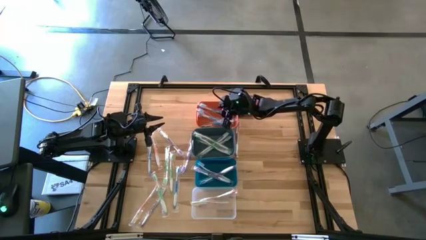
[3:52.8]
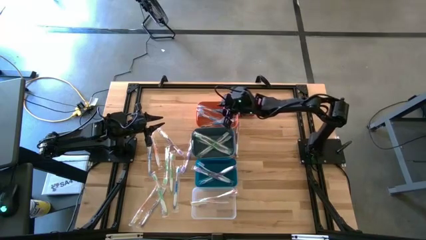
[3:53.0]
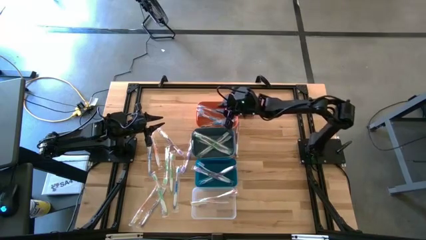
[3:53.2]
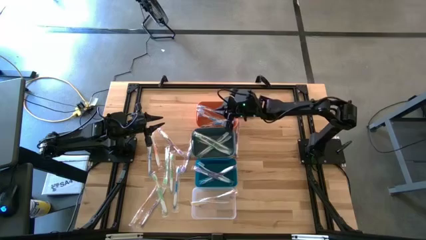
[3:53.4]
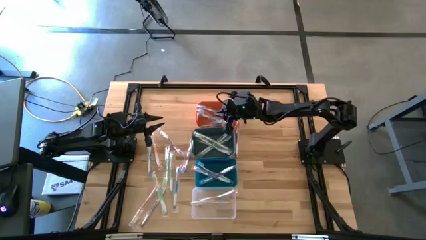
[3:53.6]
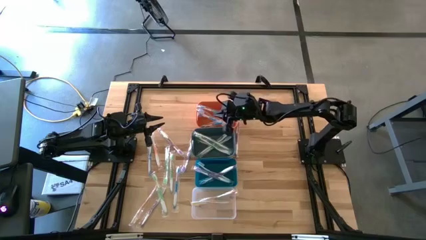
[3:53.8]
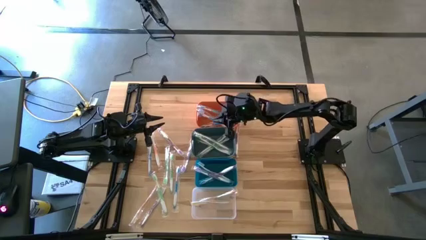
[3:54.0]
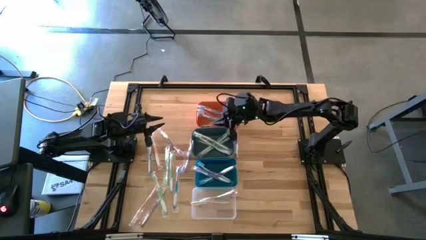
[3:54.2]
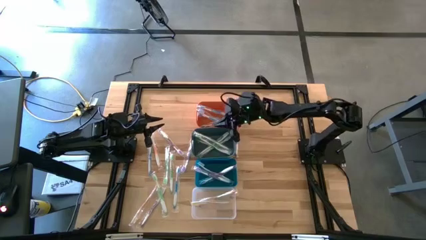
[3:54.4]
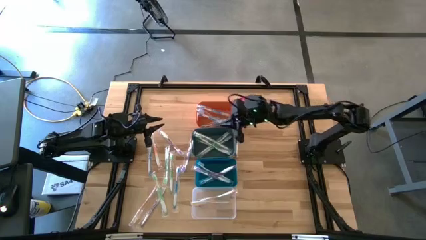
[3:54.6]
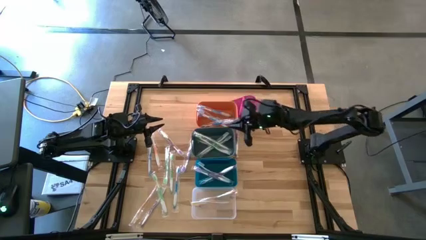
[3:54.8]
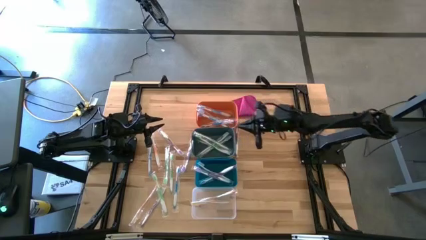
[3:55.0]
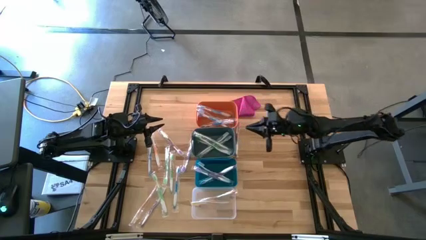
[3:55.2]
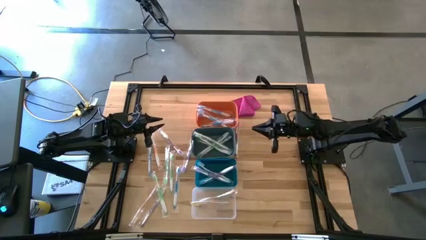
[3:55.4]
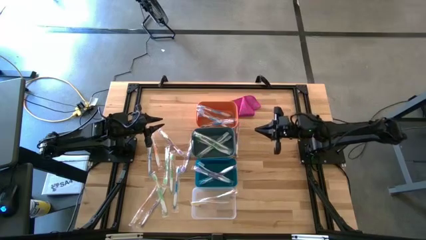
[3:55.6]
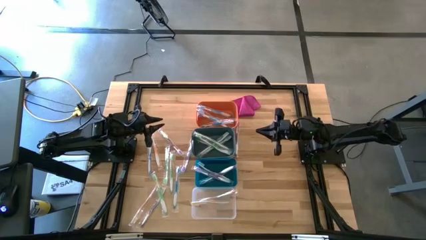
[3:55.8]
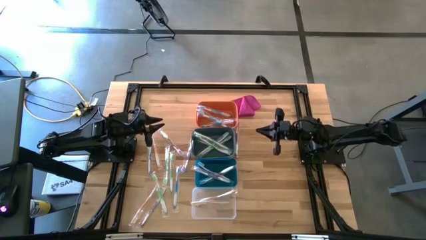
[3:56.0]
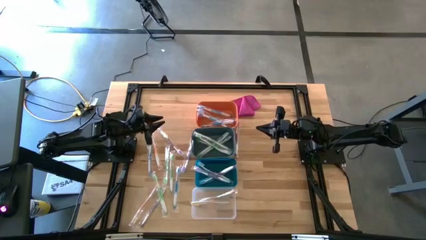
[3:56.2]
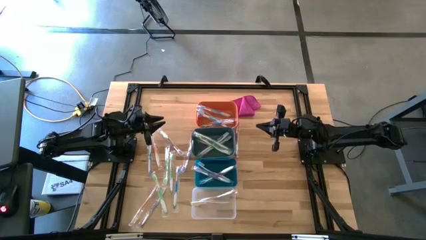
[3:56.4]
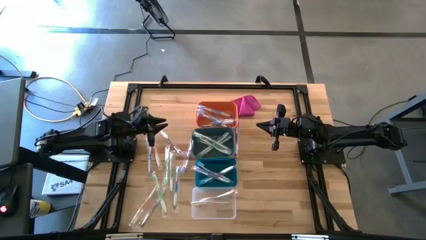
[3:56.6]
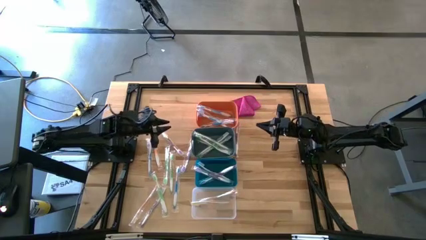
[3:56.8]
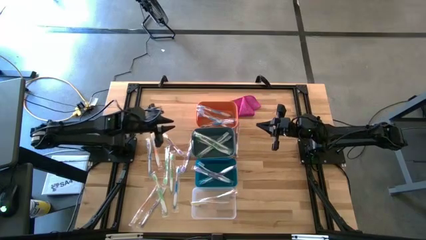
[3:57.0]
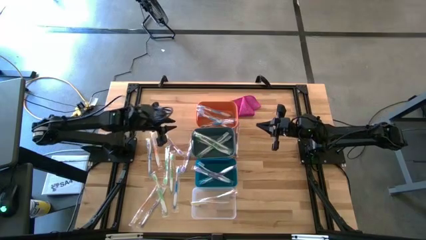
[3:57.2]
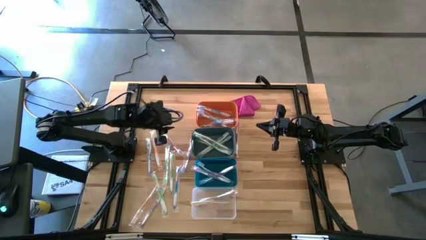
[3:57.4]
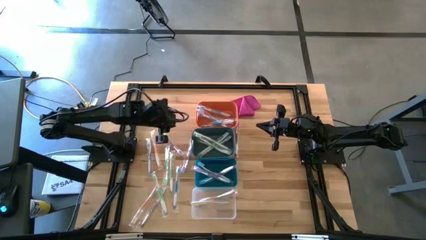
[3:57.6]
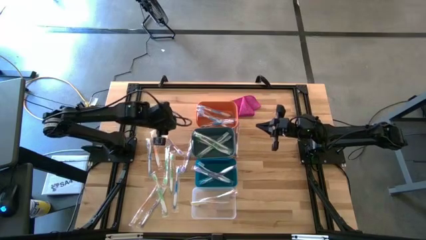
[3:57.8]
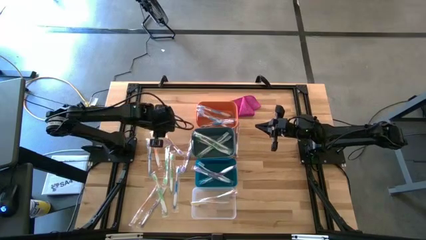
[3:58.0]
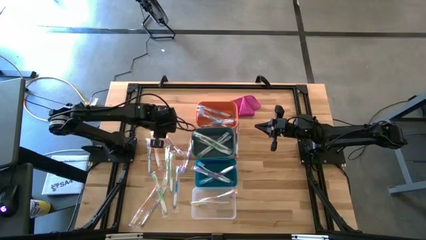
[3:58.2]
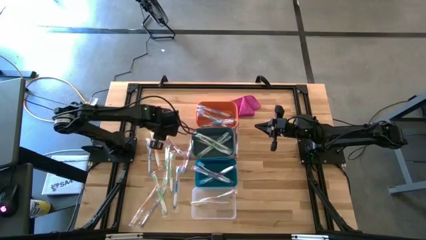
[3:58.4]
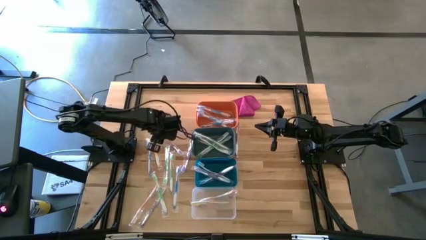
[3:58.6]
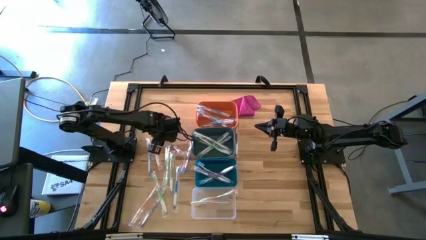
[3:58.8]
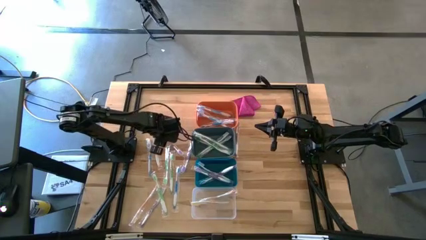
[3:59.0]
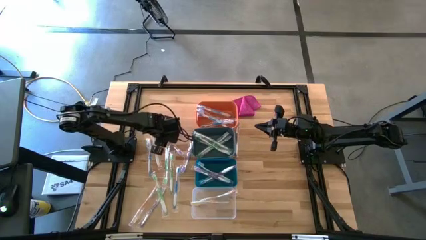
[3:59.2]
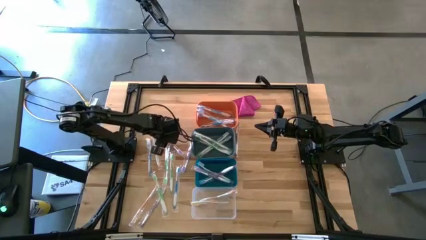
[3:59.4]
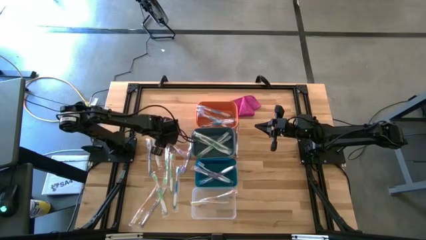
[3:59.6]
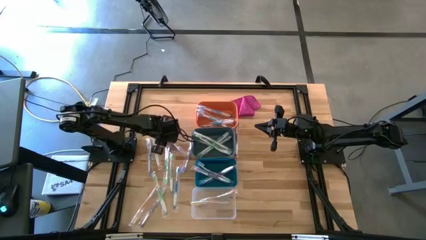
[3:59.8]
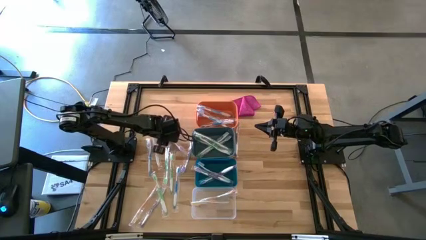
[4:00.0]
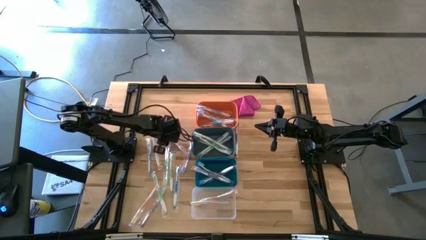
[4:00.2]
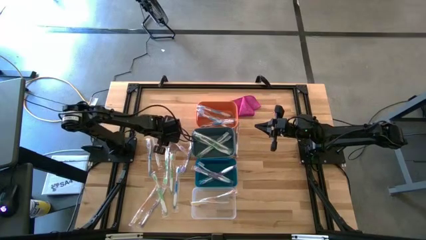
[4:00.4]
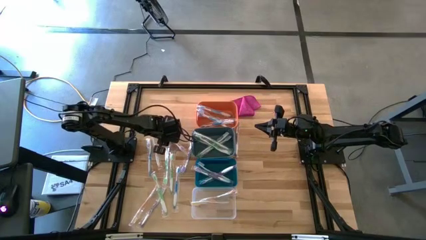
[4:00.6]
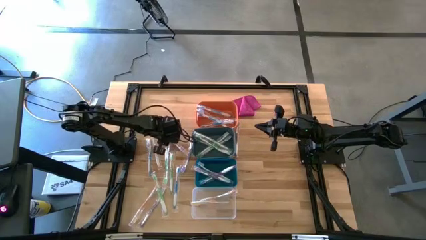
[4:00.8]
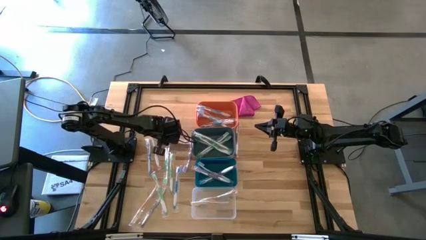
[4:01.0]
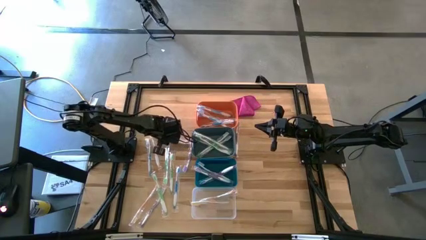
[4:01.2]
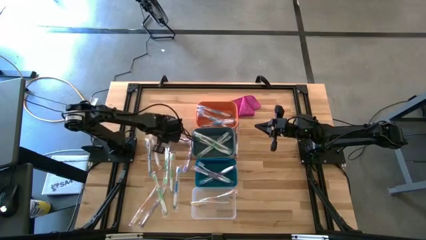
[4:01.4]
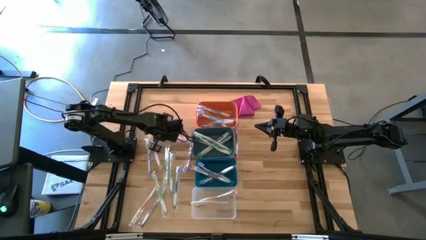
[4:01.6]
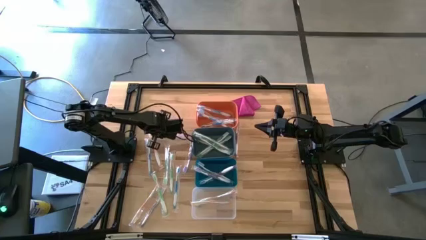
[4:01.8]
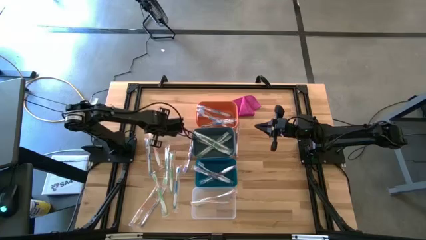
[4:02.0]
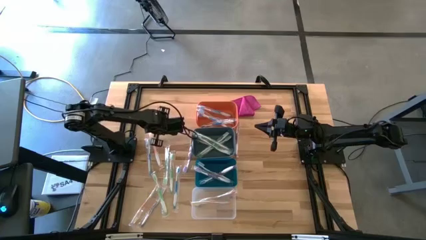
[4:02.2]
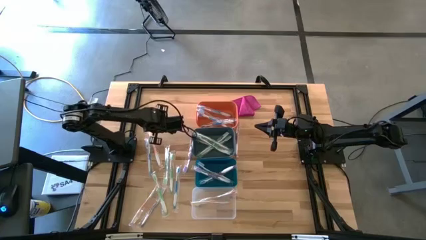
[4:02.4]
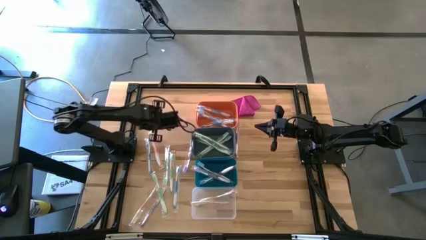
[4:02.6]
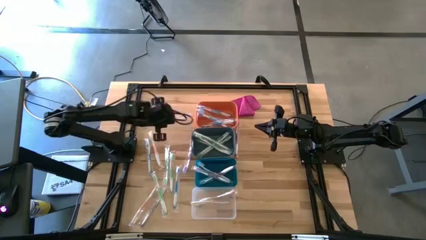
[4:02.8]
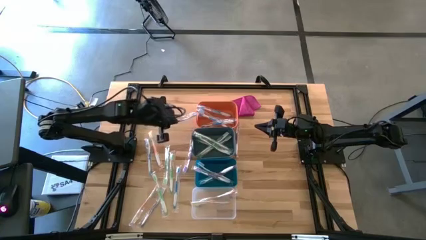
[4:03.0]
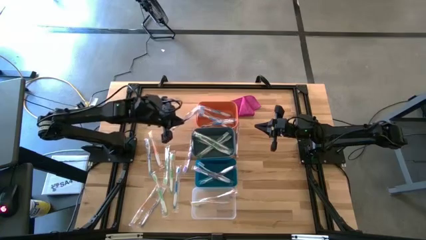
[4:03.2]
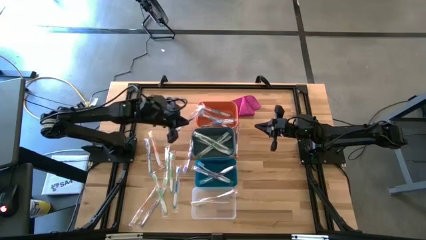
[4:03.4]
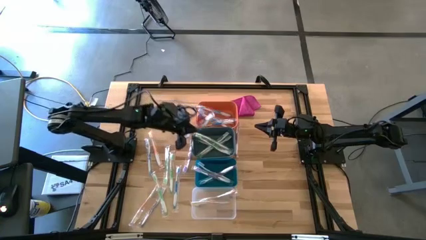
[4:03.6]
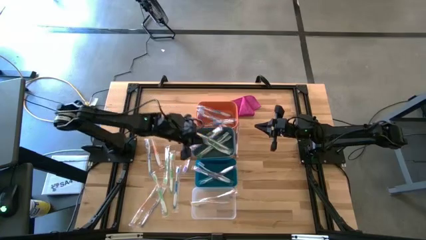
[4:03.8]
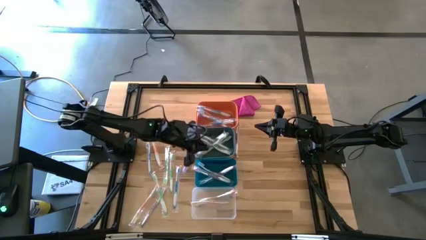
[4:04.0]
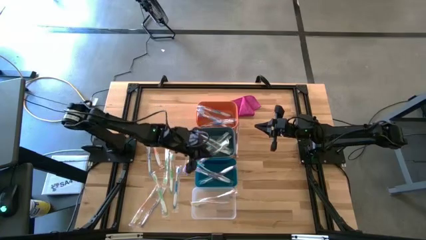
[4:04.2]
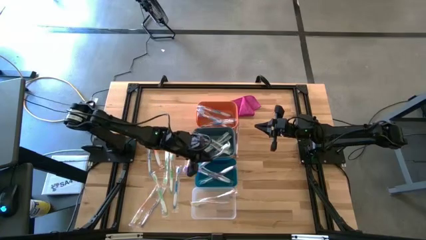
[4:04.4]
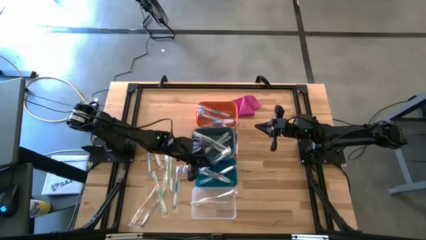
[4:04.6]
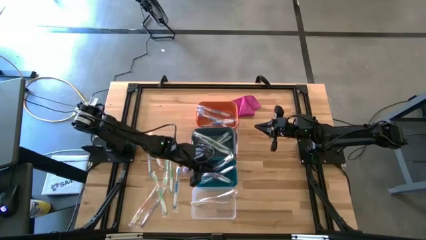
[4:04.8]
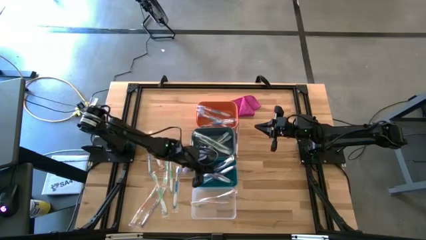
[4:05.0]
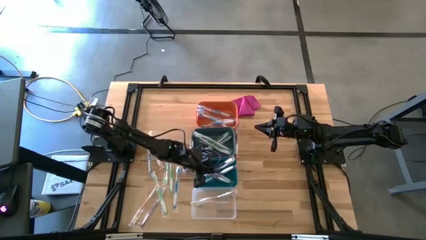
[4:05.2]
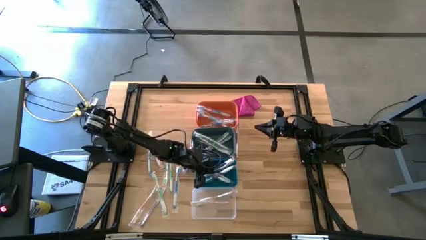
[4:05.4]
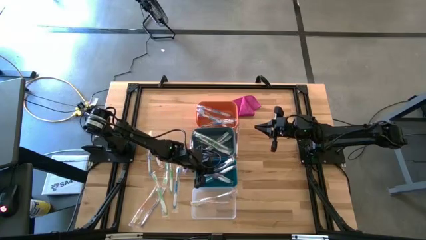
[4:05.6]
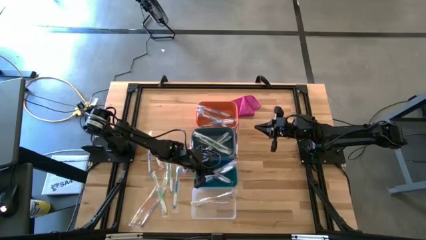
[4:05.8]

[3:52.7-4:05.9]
Task: Pick & Place Toothbrushes
Put the purple toothbrush into the blue bin

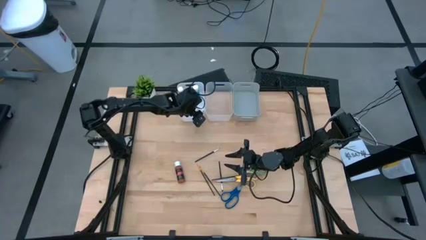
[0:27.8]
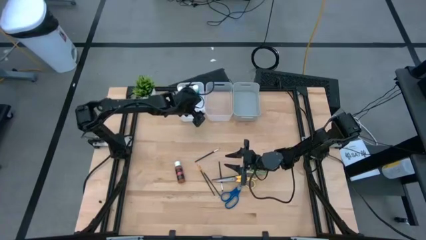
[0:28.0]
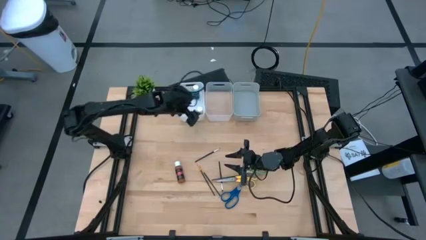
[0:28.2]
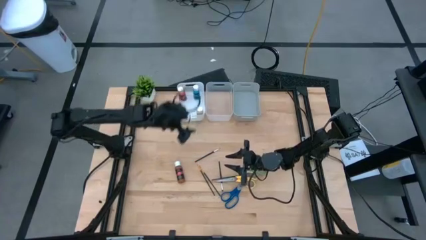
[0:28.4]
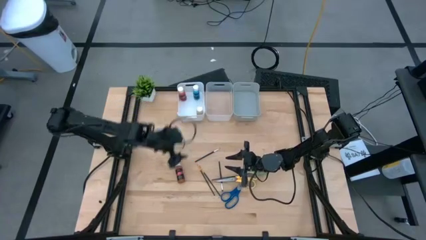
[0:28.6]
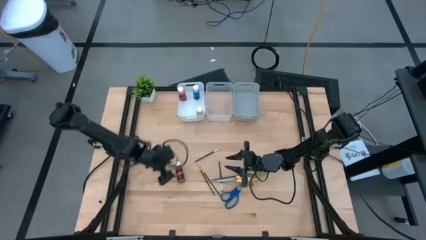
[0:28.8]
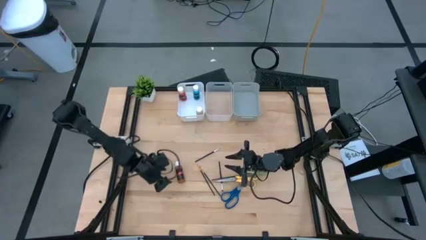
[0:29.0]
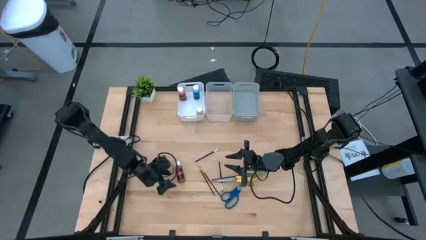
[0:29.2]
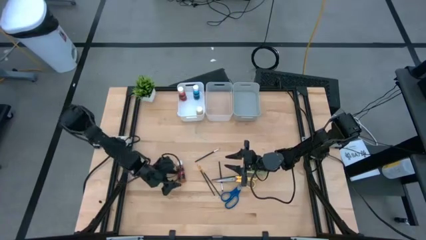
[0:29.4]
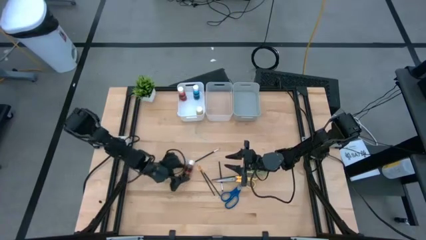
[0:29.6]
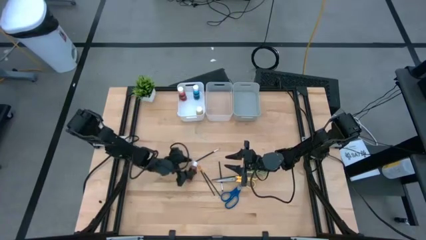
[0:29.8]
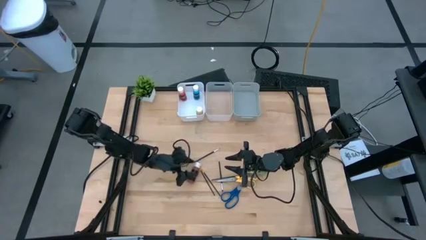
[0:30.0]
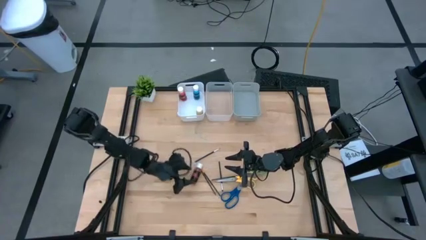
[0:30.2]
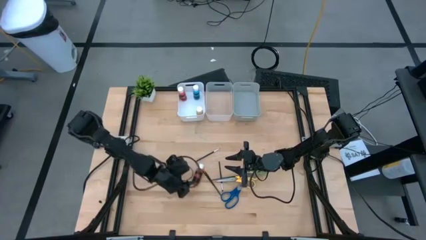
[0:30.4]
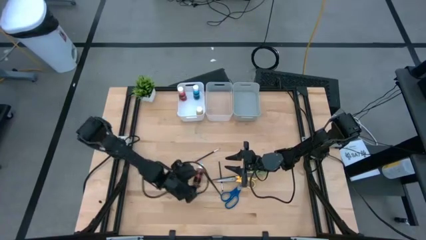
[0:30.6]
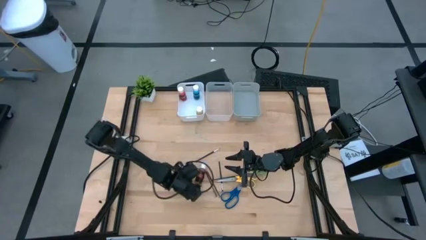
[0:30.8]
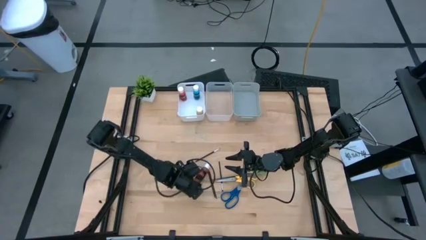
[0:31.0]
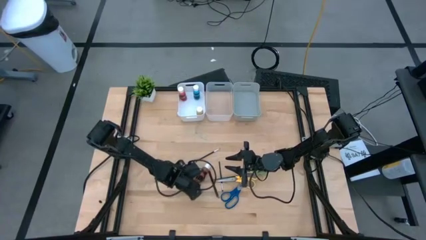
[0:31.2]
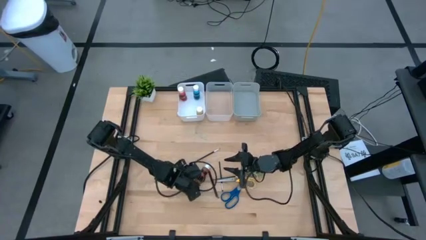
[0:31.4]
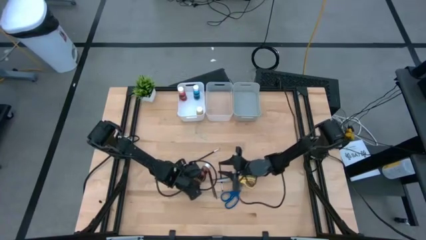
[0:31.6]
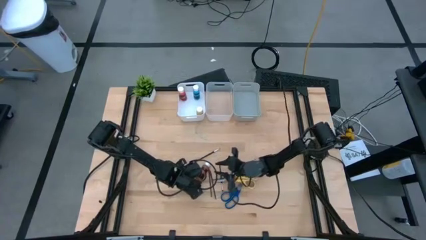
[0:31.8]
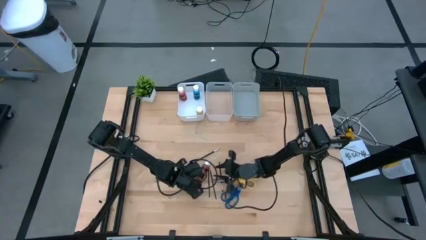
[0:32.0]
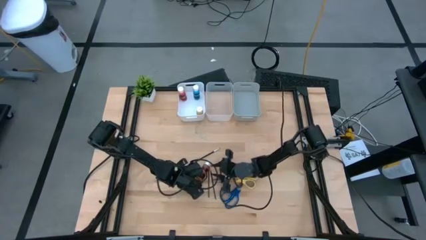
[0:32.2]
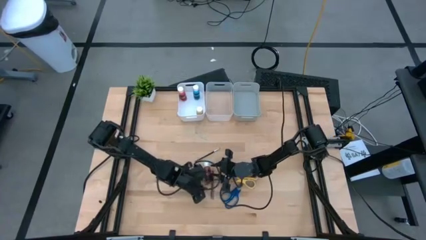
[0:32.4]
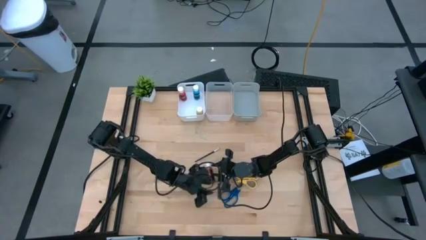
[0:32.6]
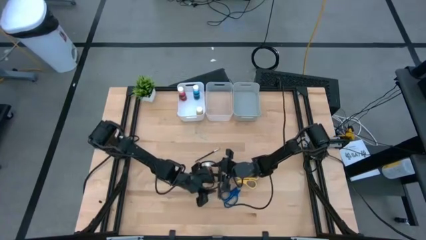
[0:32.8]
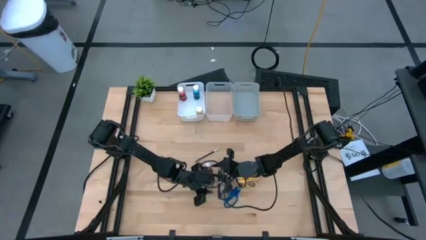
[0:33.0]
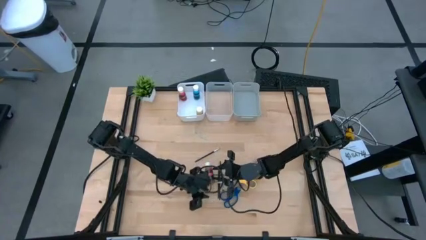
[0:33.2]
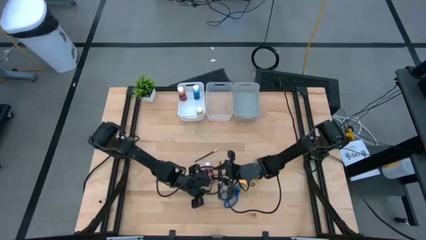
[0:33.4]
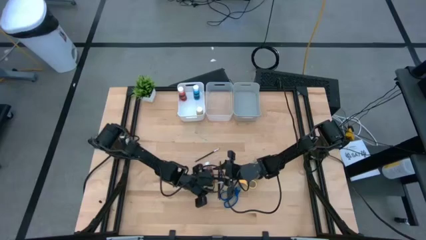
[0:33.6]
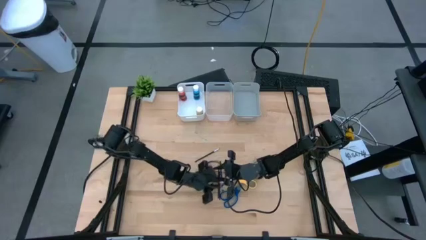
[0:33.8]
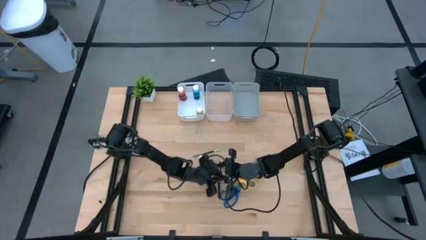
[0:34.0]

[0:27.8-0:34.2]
Task: Pick & Place Paint Supplies
Put the brown paint bottle into the white bin
